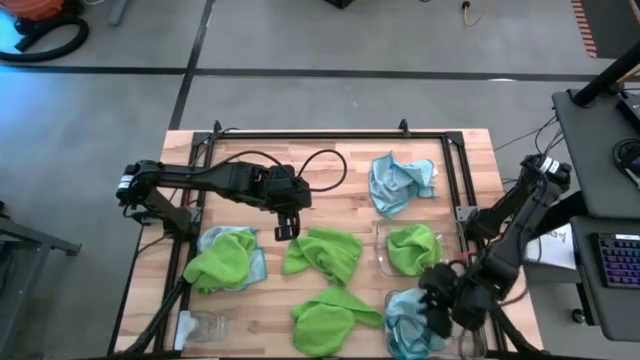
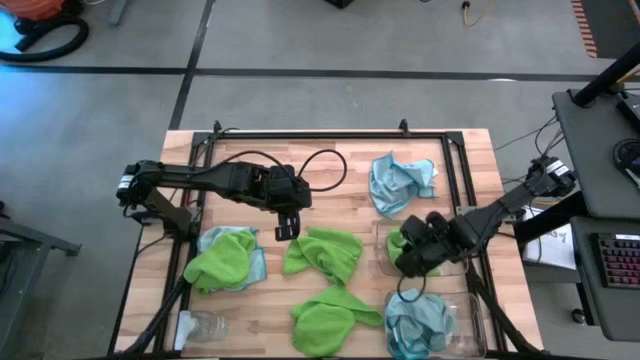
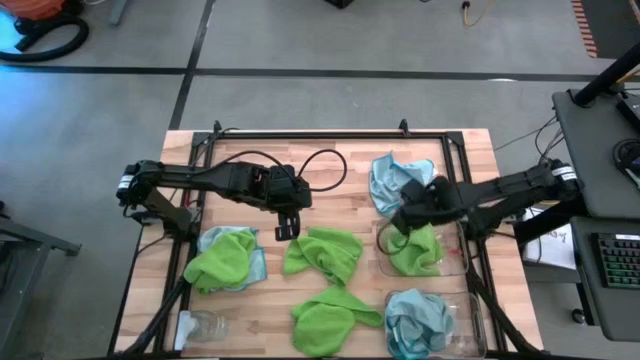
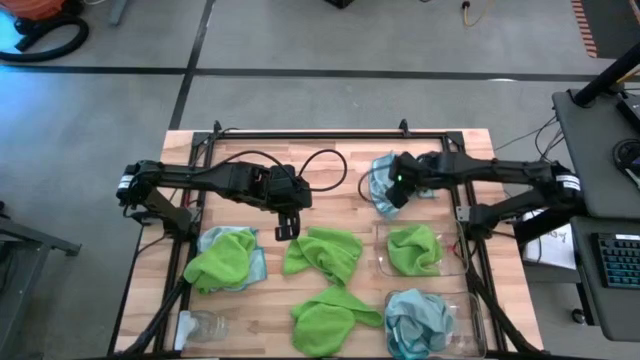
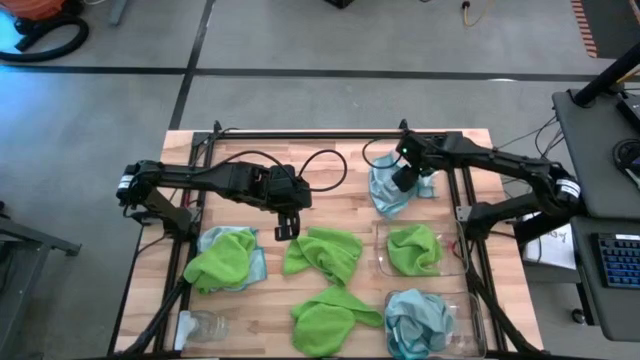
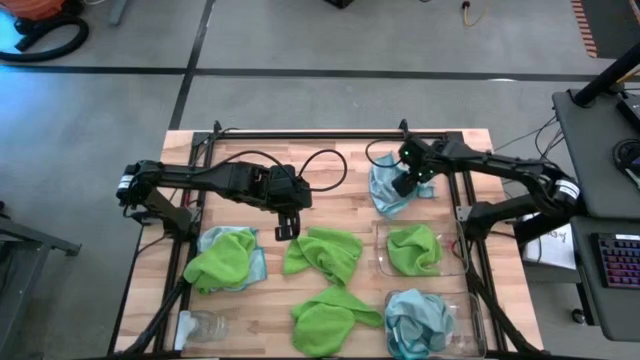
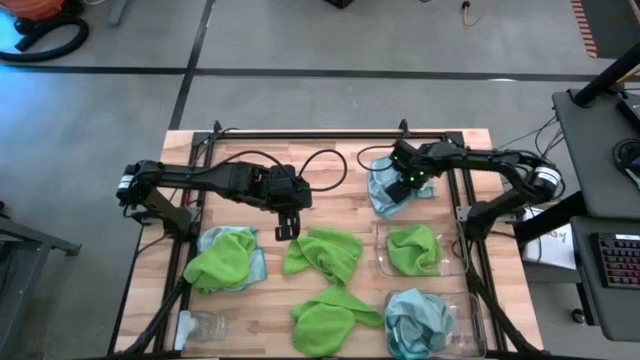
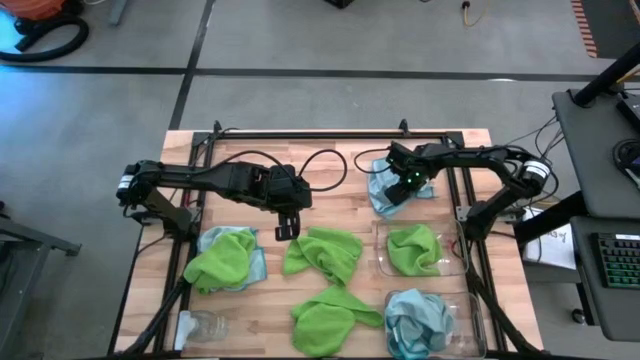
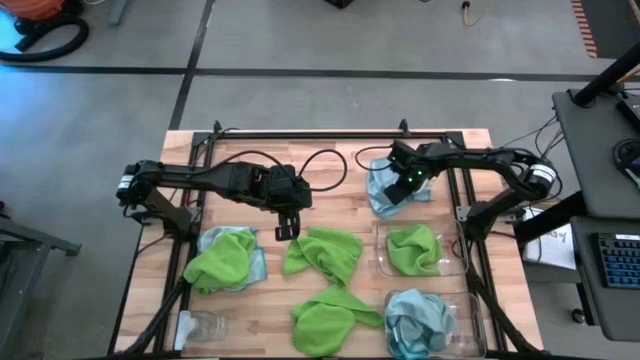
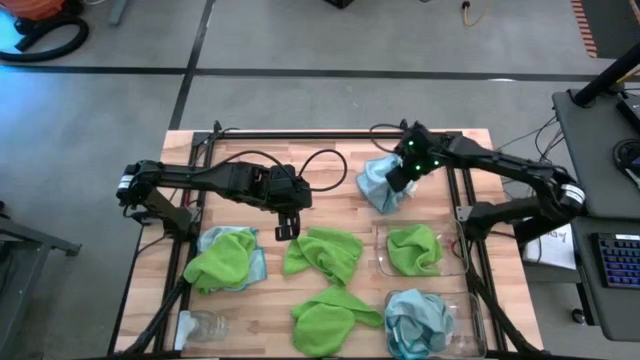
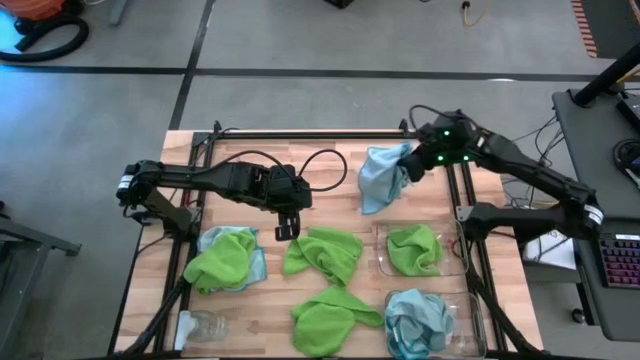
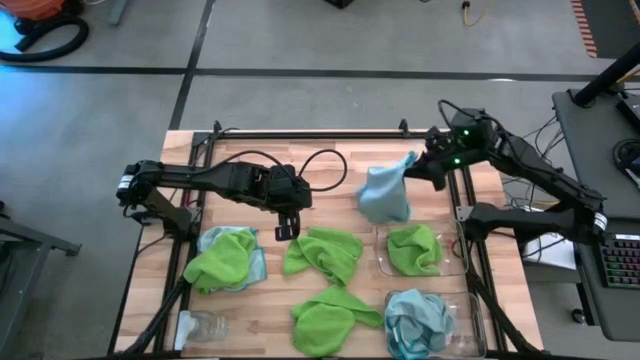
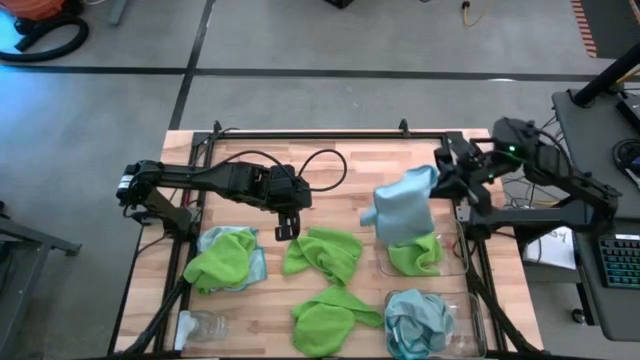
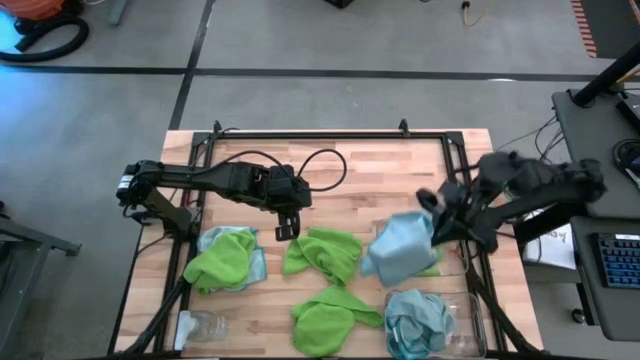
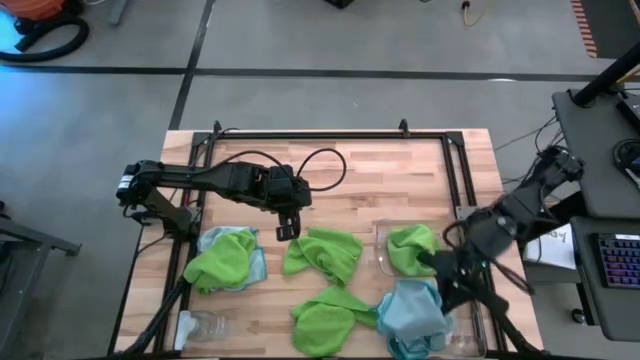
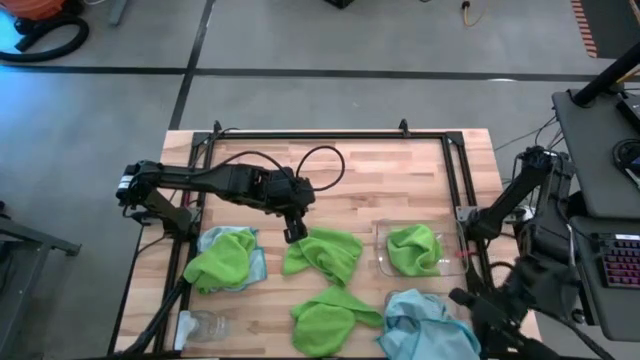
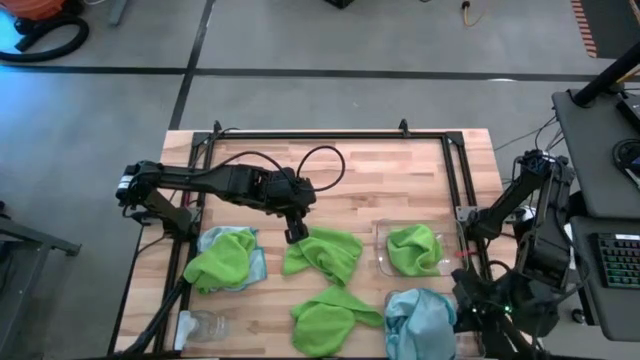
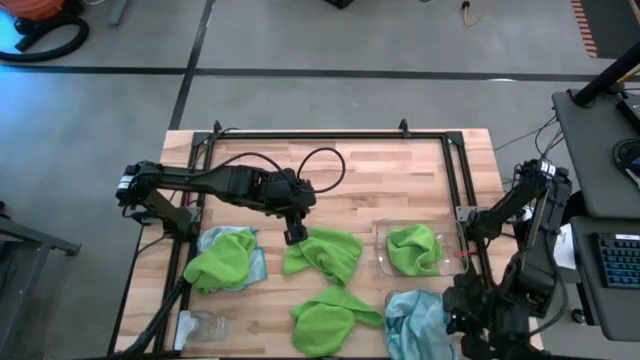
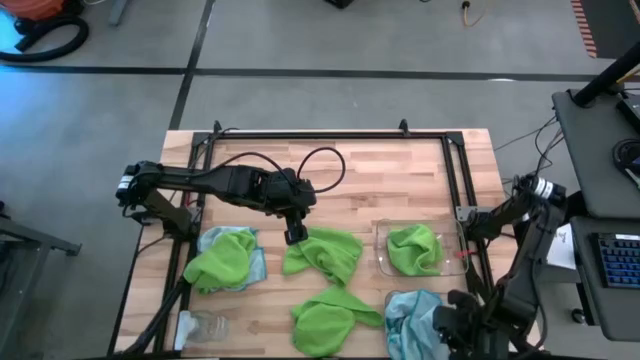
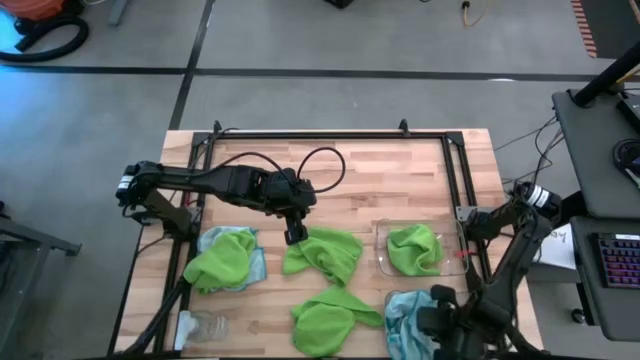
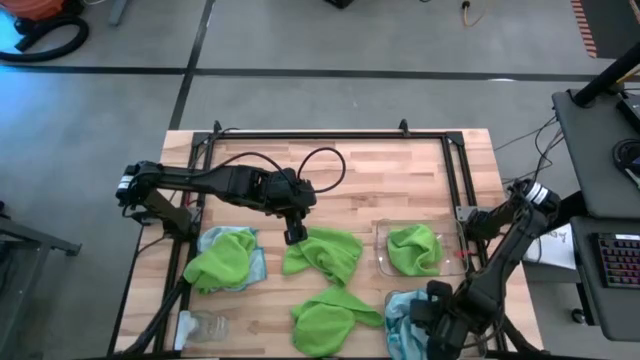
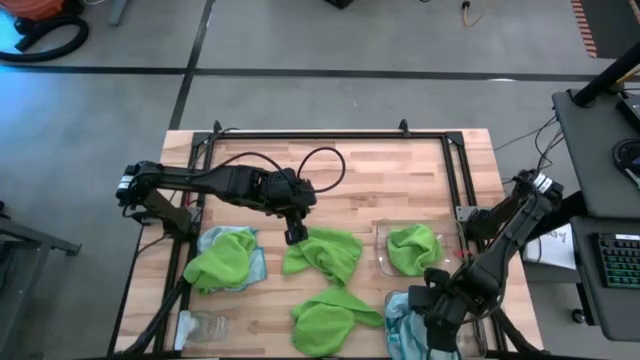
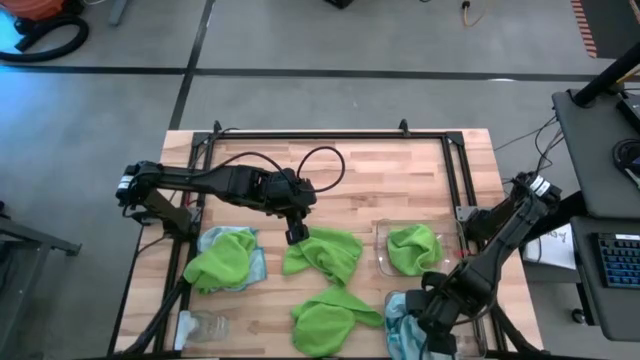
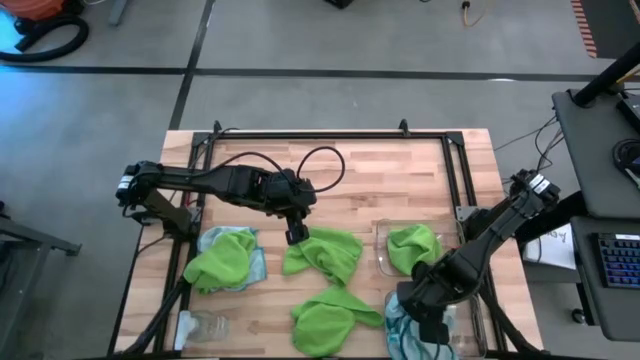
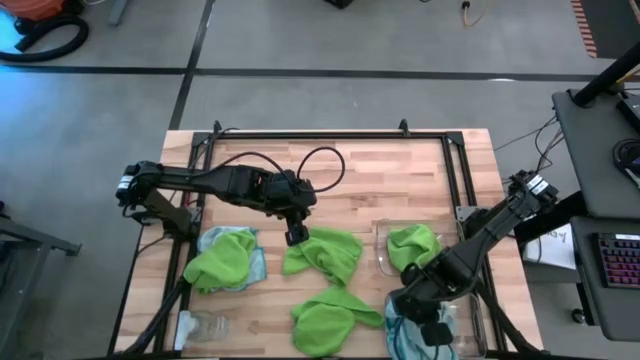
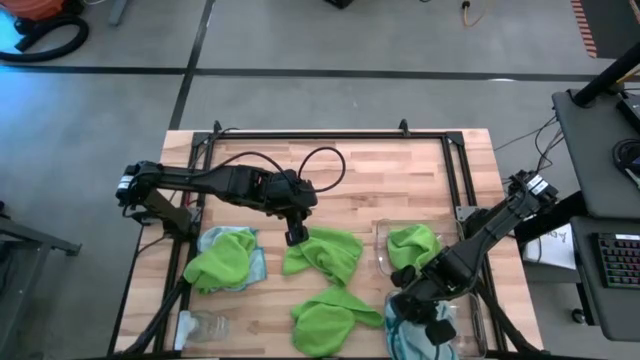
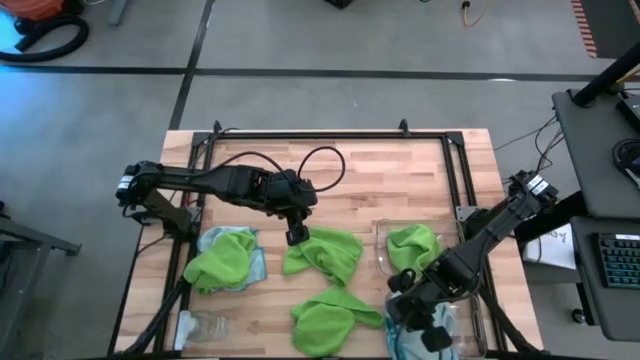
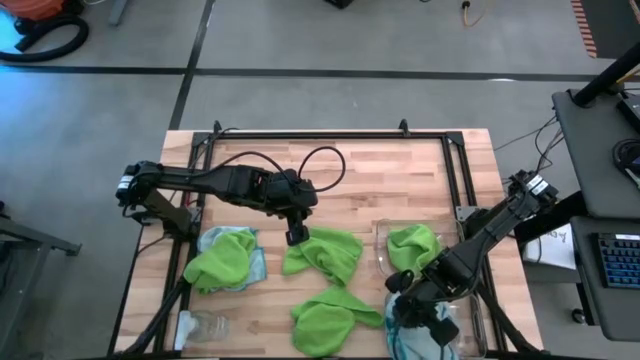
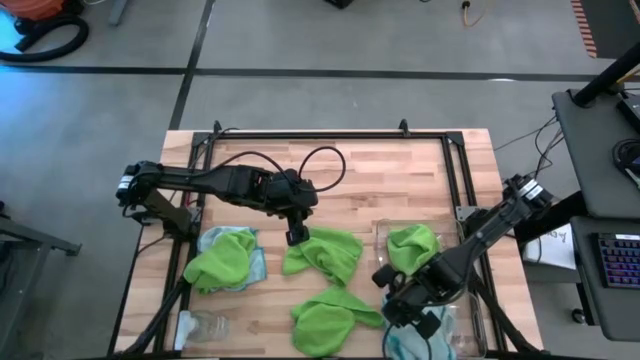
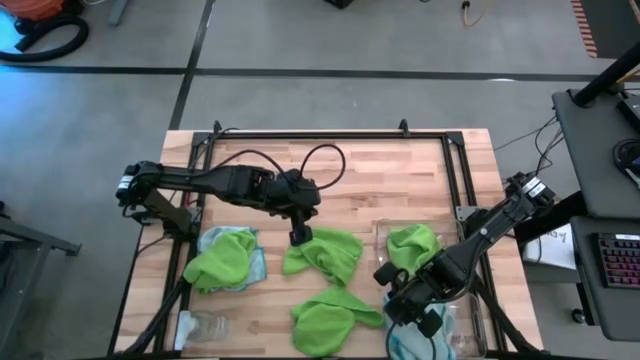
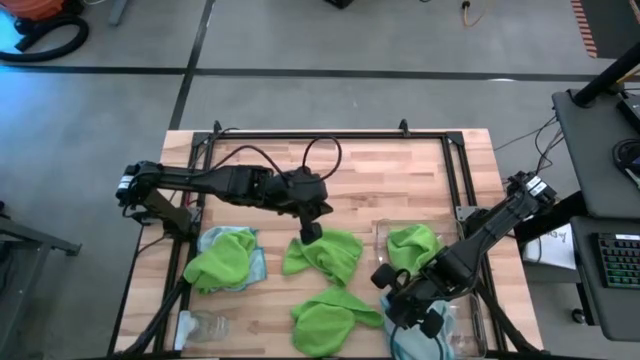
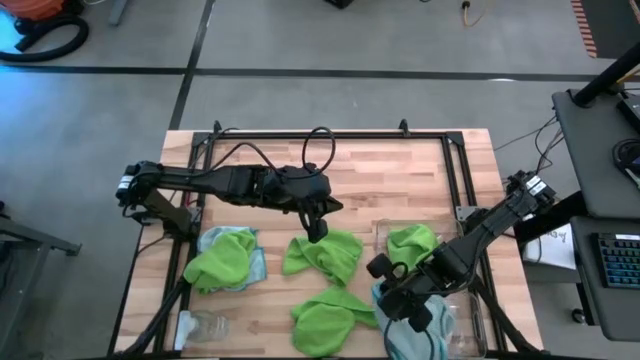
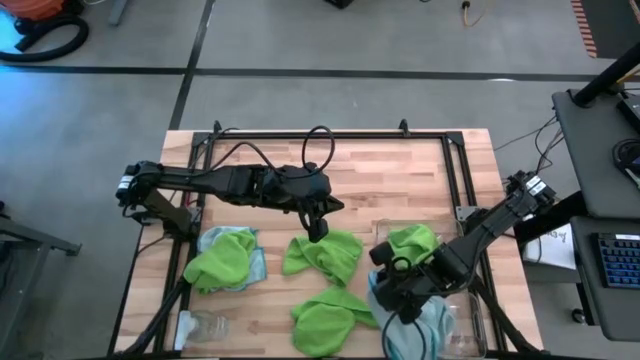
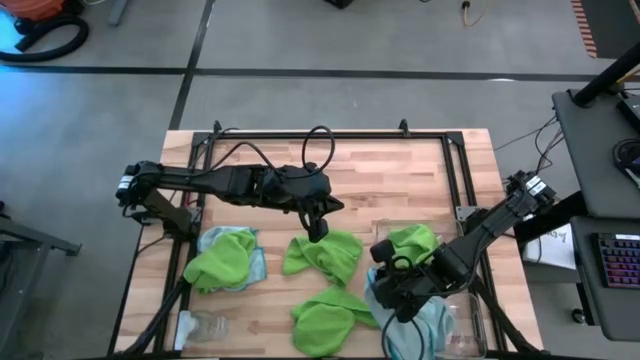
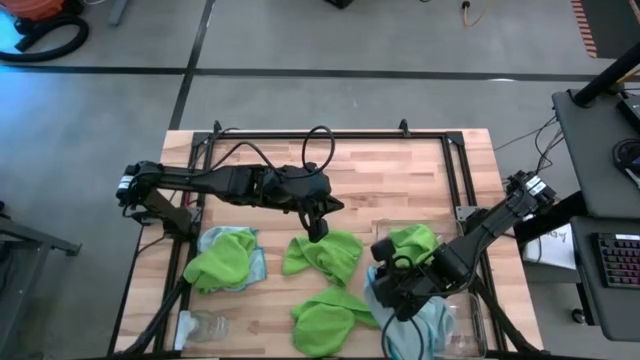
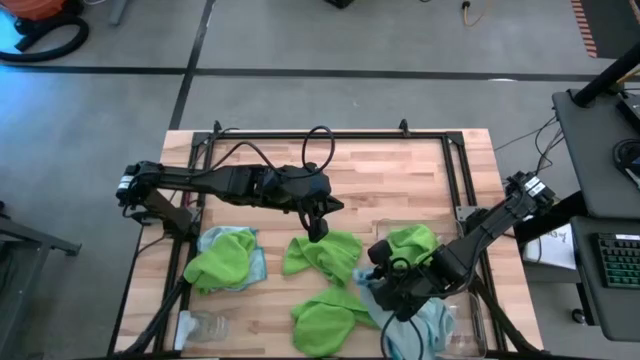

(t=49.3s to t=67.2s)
Task: Sort microfiber towel by color & place in baskets
Put the blue microfiber cloth into the bottom transparent bin
